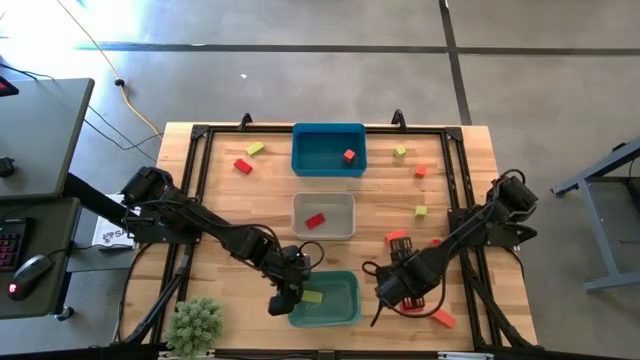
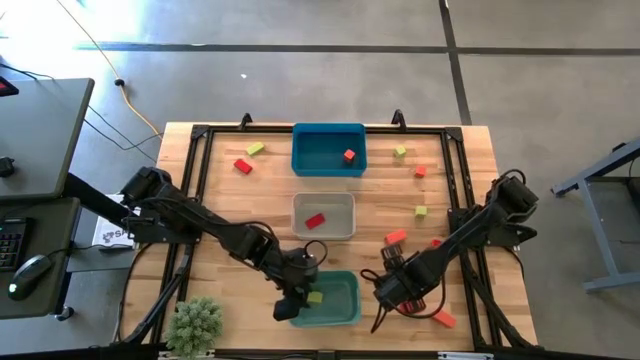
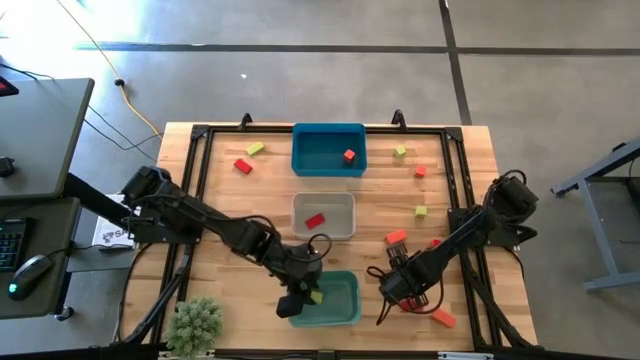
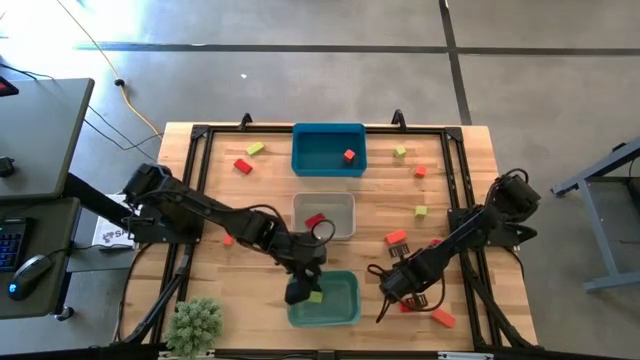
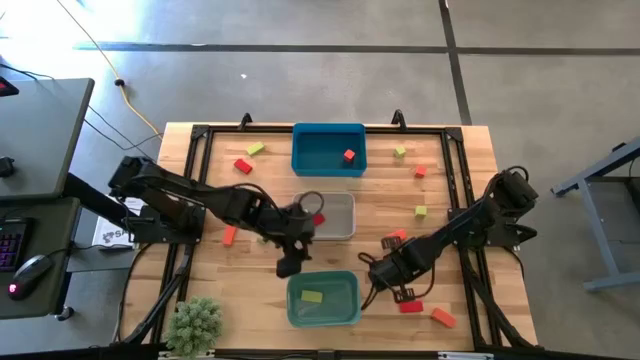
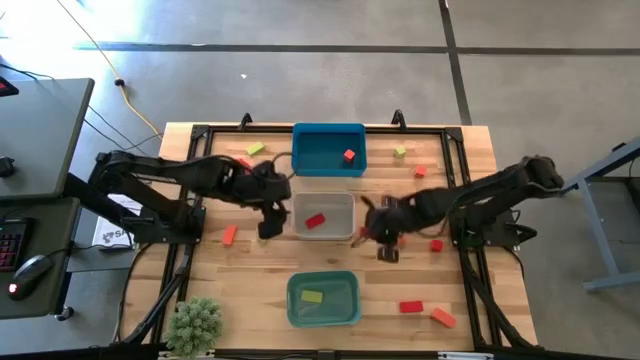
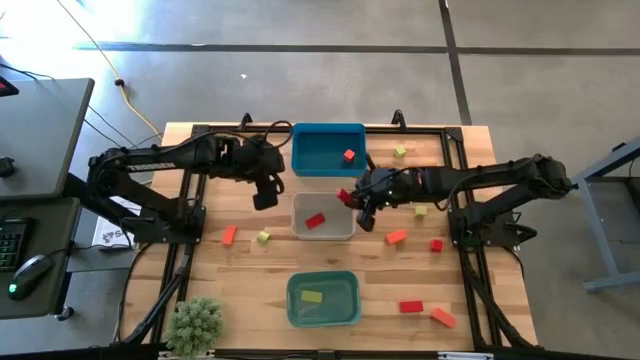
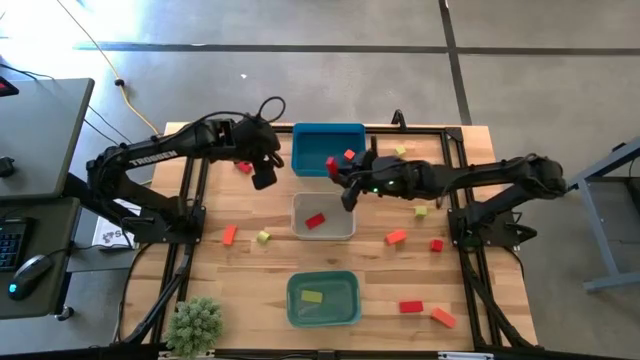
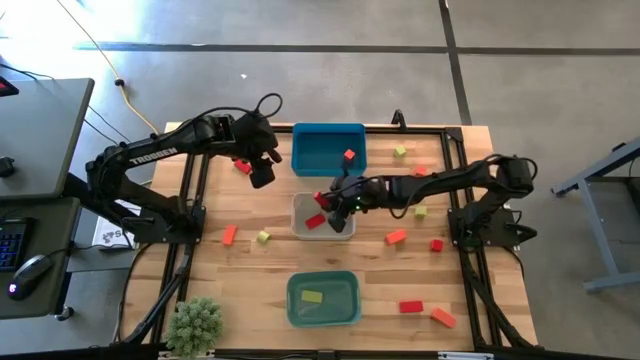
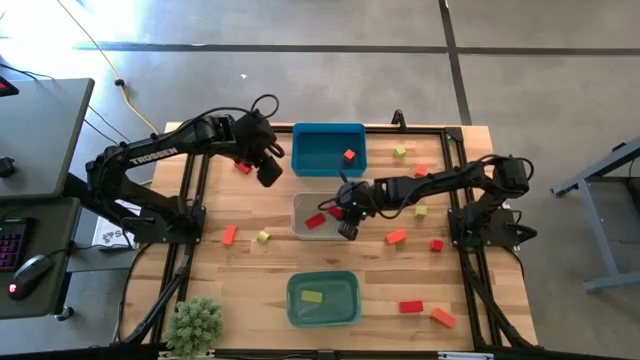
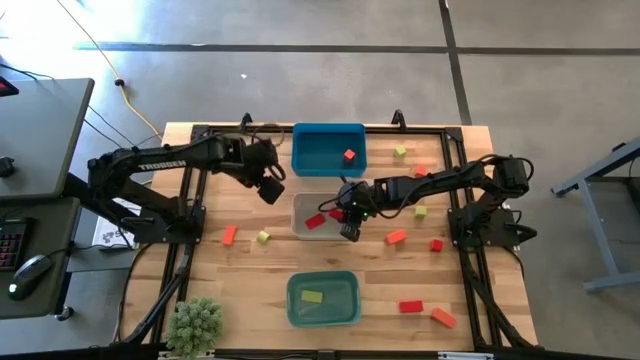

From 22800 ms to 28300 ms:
Task: Sort & place blocks by color
Put the red block into the gray bin

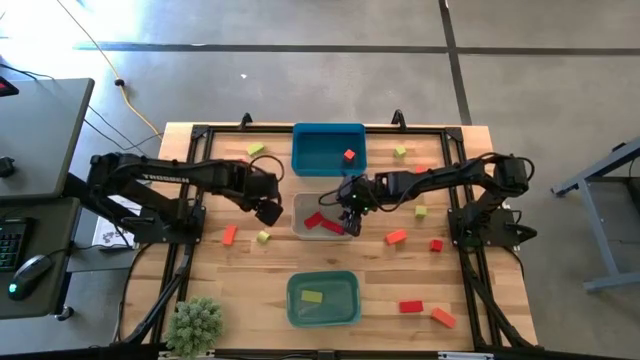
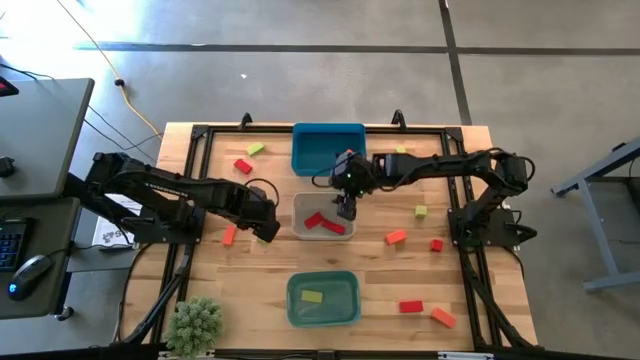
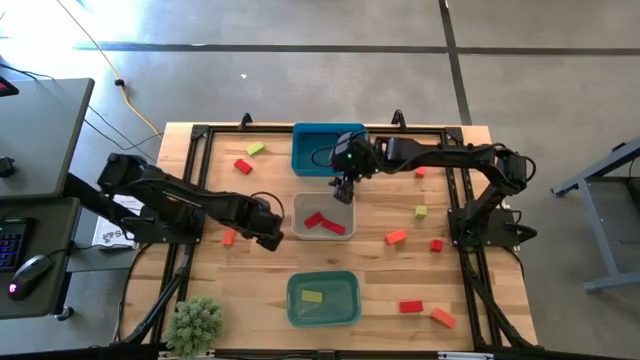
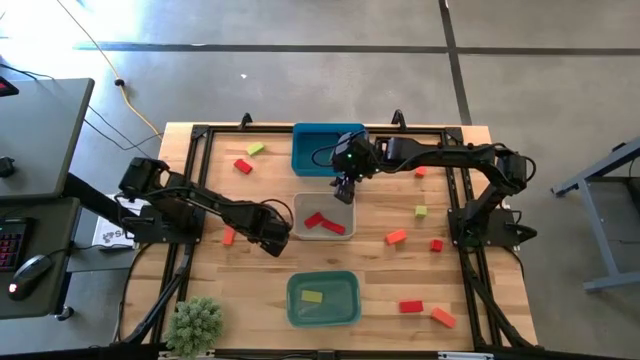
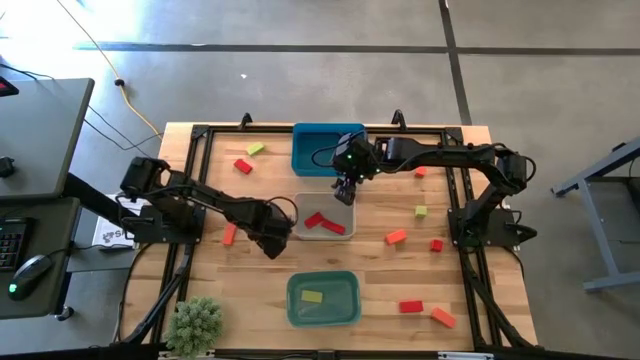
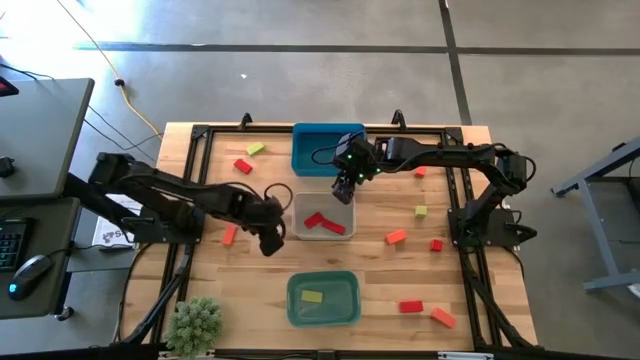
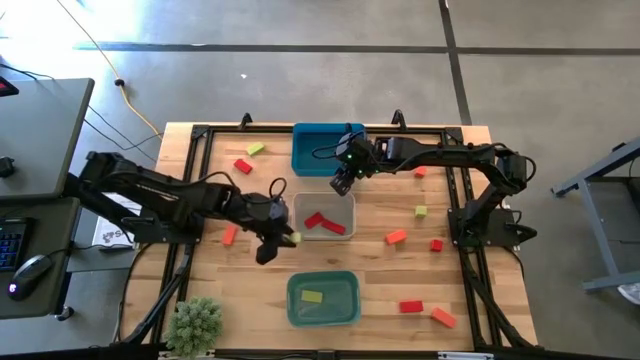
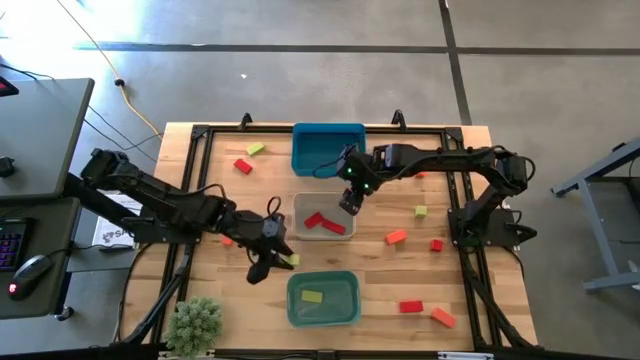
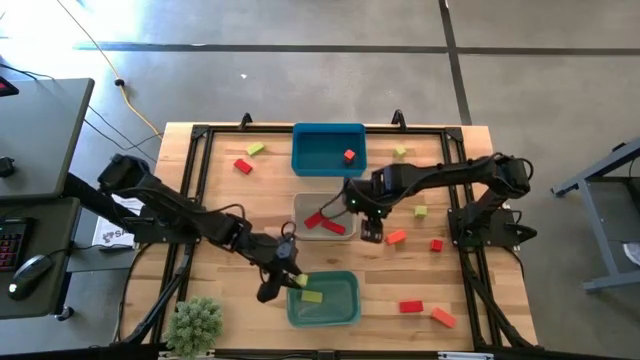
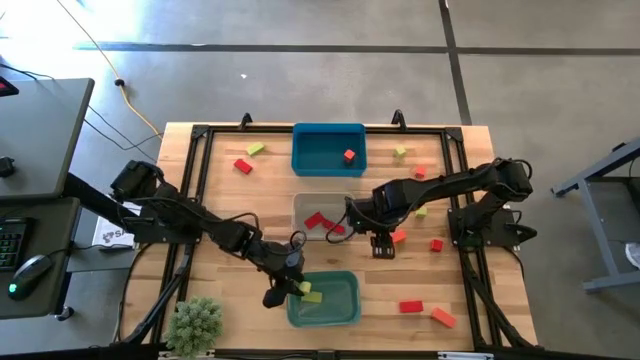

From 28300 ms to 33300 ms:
Put the light green block into the green bin

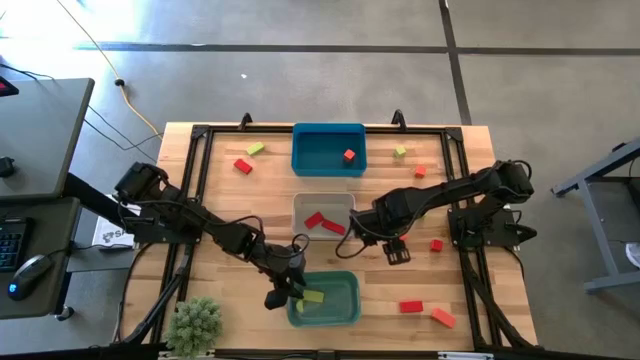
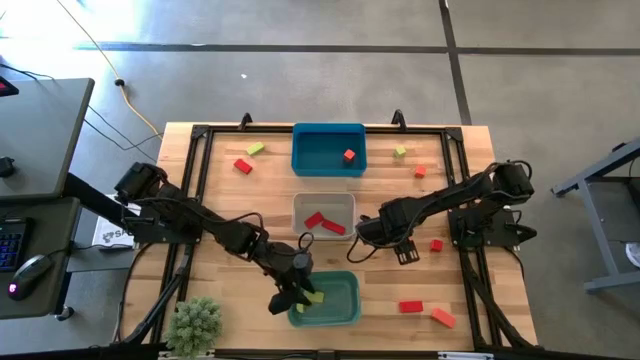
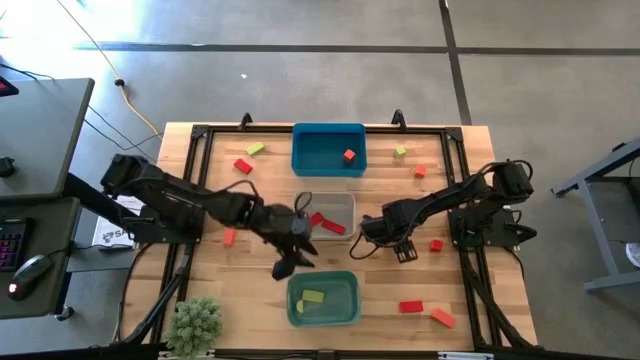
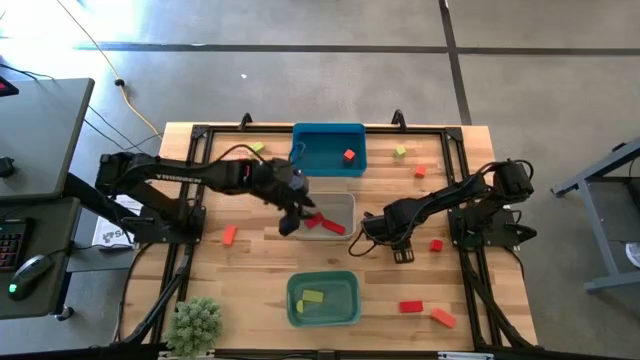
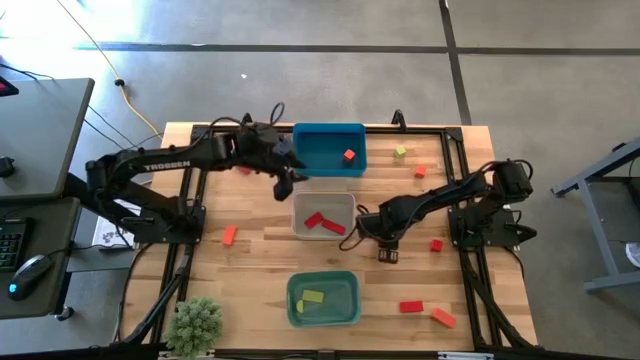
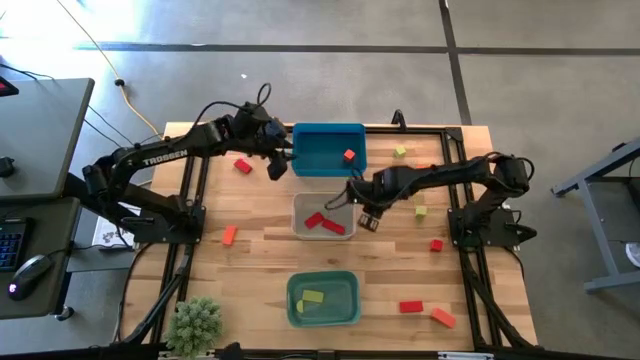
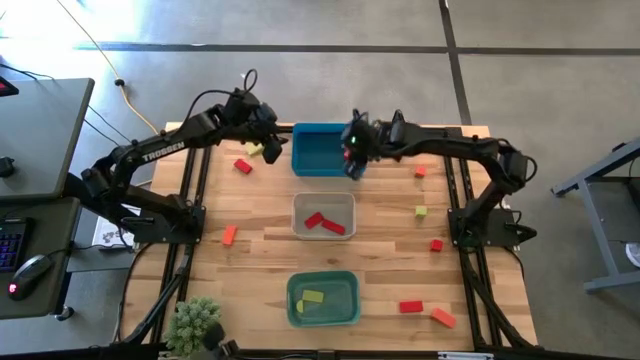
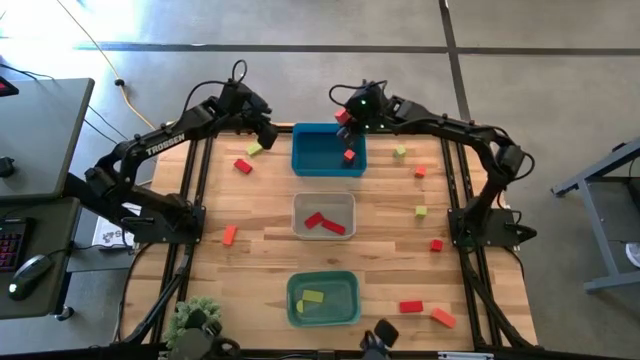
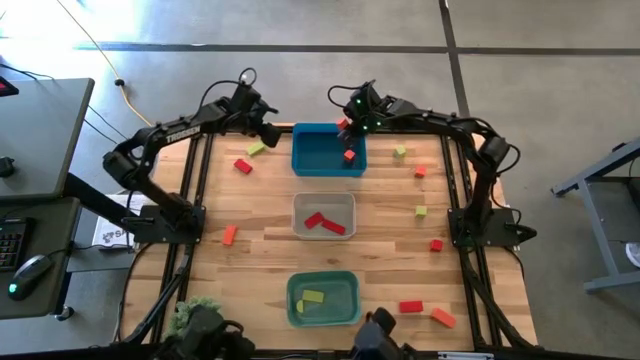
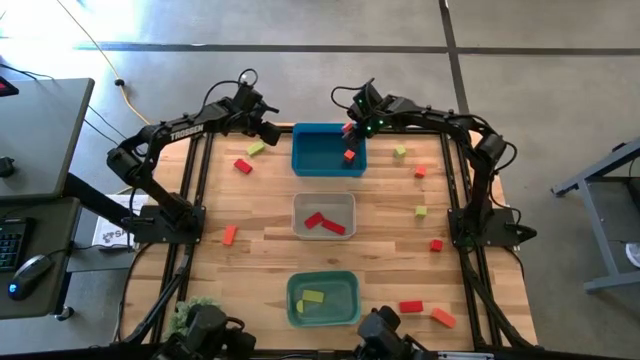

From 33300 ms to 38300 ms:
Put the orange block into the blue bin

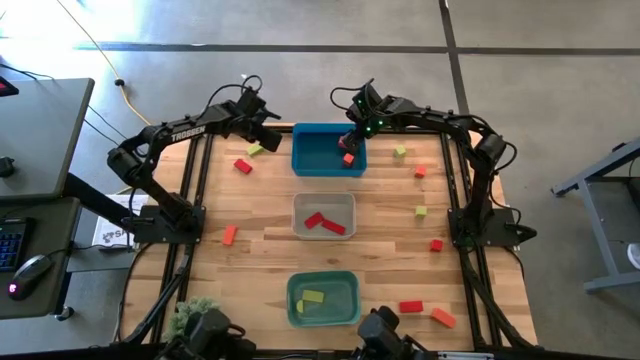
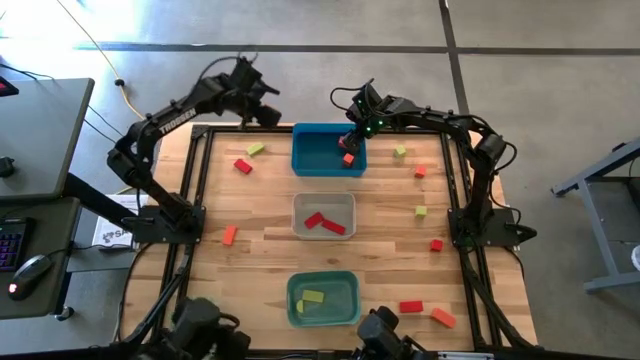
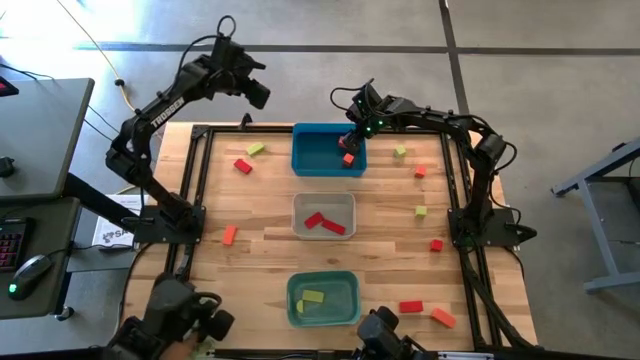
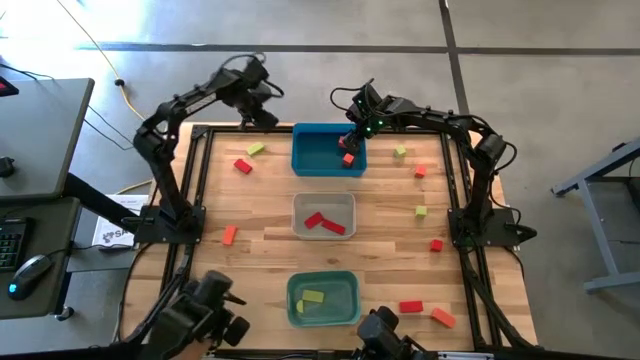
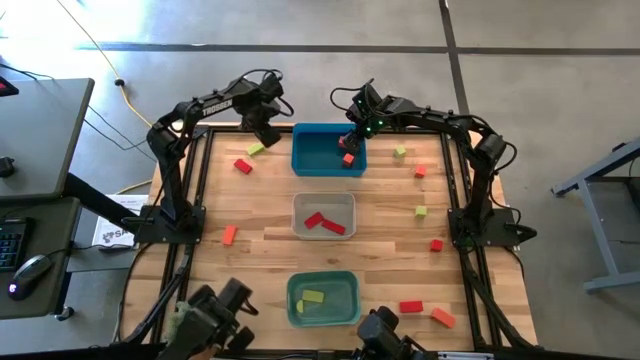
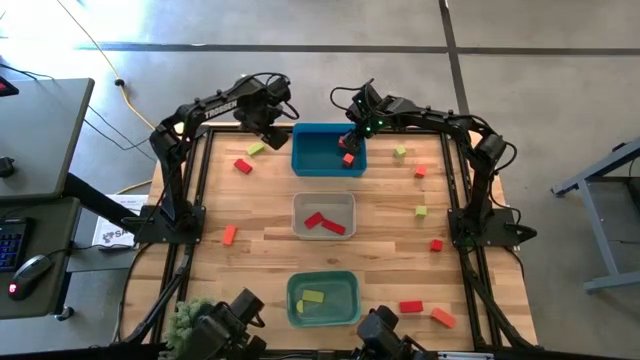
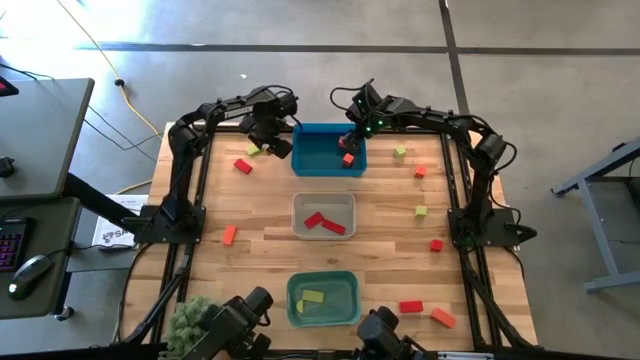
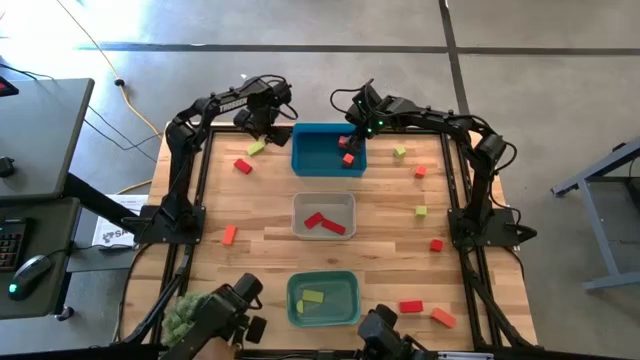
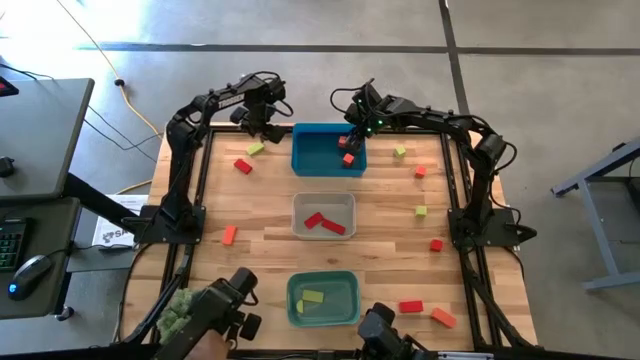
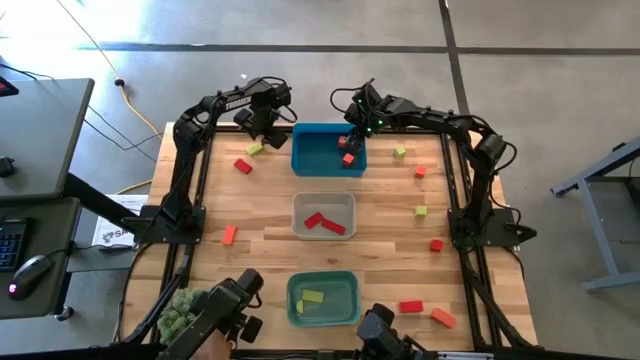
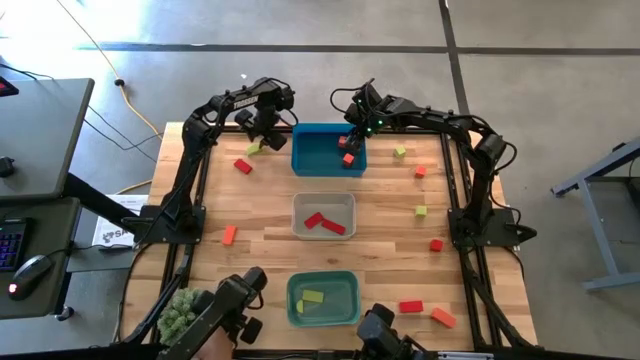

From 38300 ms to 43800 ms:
Put the light green block into the green bin
